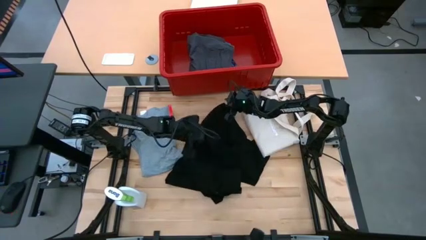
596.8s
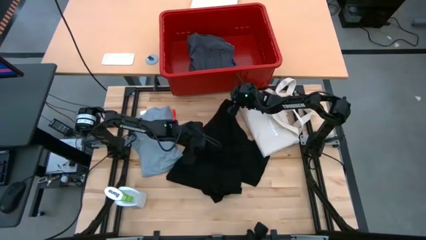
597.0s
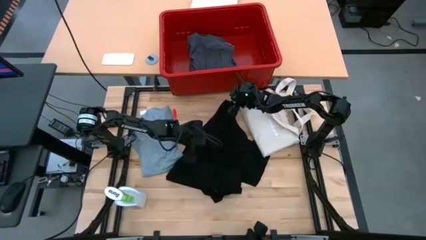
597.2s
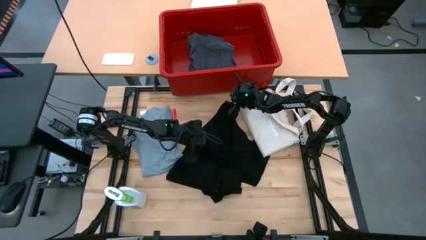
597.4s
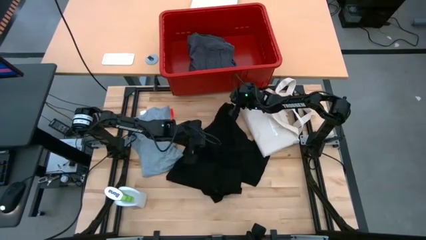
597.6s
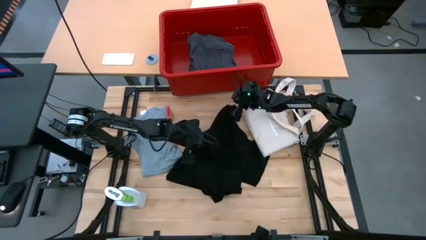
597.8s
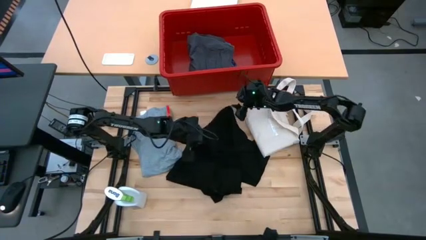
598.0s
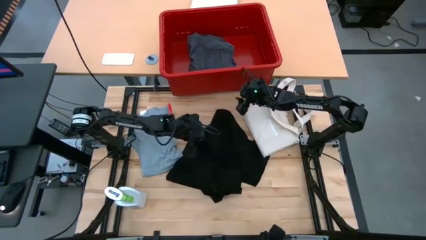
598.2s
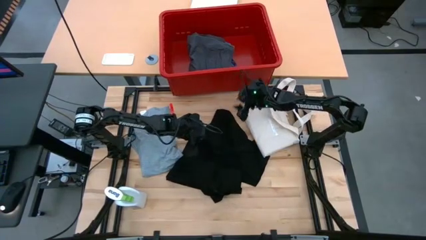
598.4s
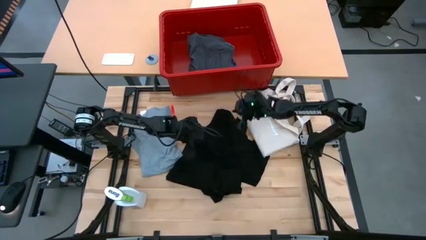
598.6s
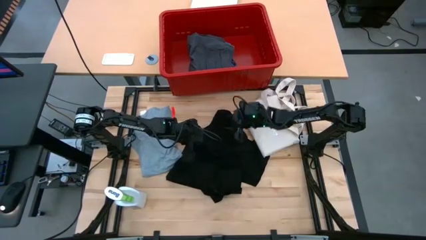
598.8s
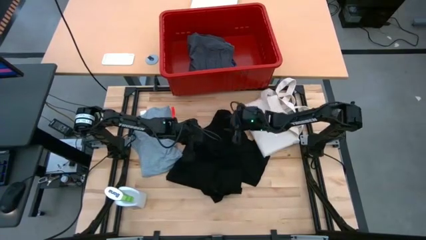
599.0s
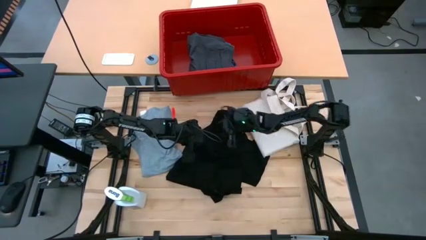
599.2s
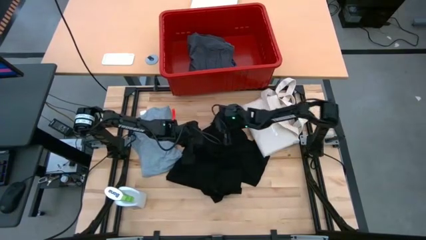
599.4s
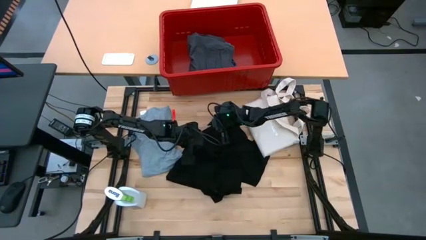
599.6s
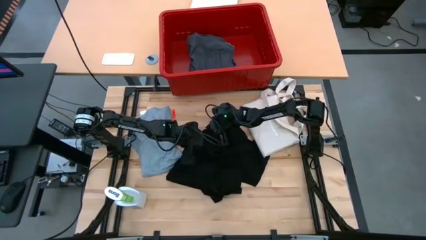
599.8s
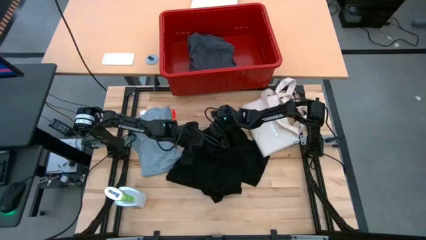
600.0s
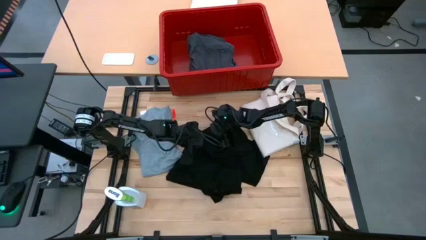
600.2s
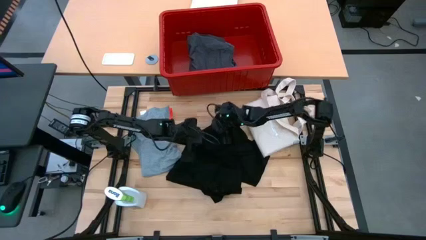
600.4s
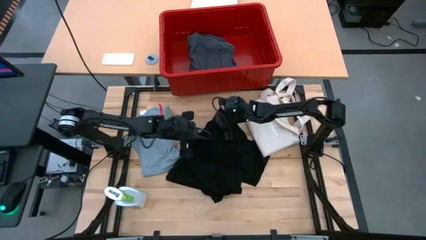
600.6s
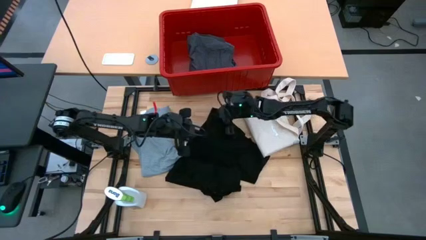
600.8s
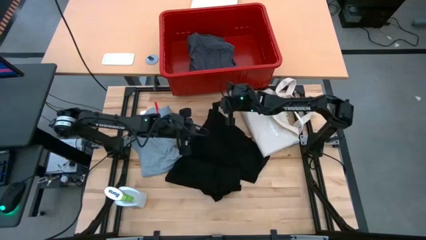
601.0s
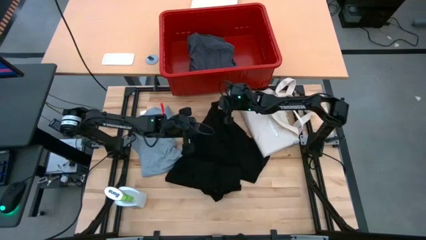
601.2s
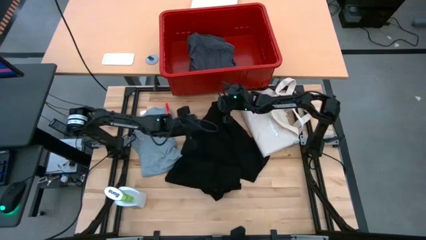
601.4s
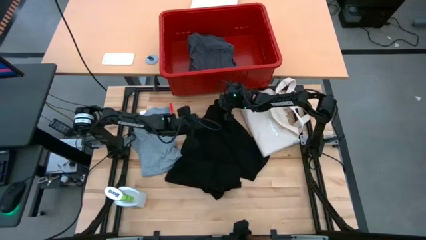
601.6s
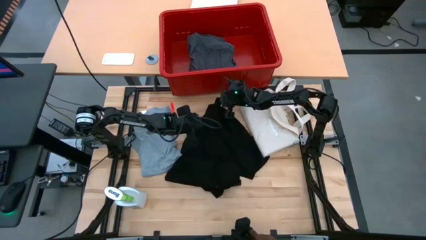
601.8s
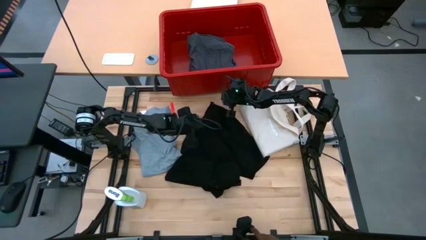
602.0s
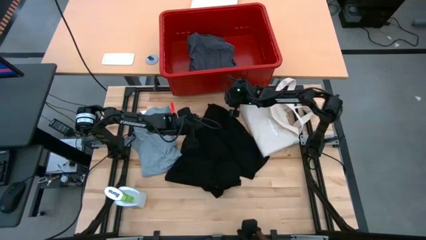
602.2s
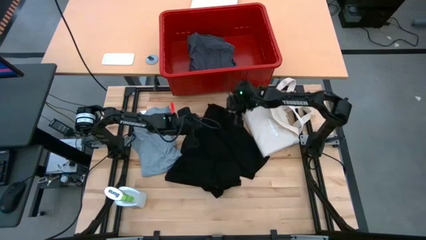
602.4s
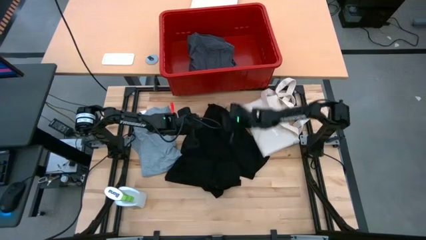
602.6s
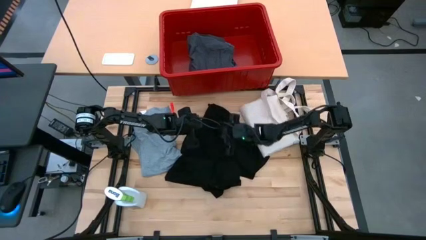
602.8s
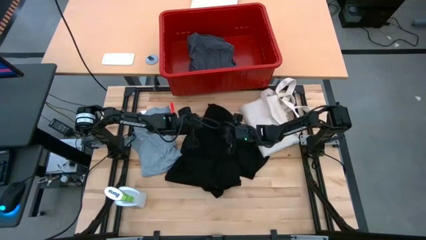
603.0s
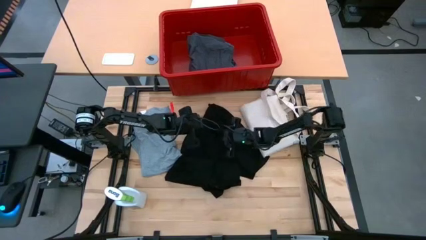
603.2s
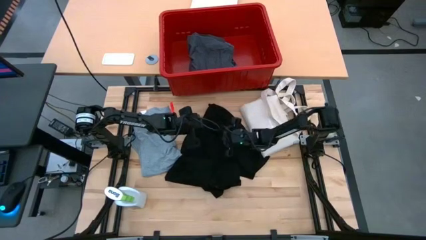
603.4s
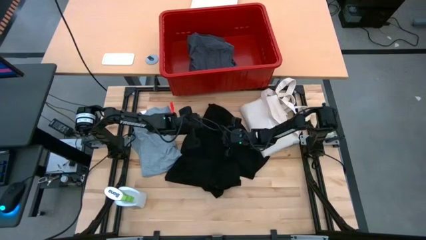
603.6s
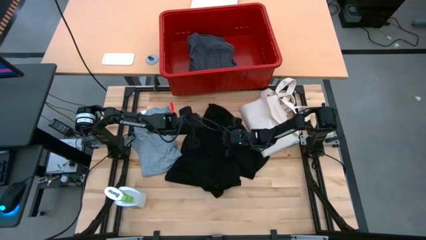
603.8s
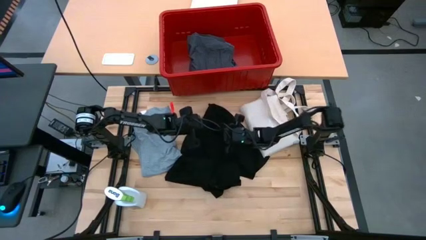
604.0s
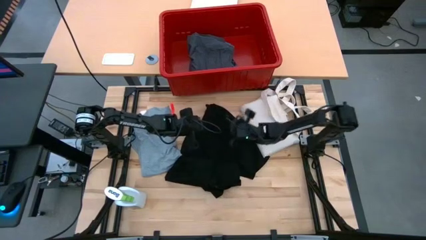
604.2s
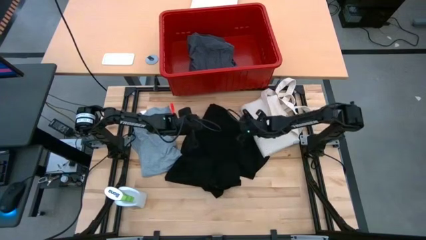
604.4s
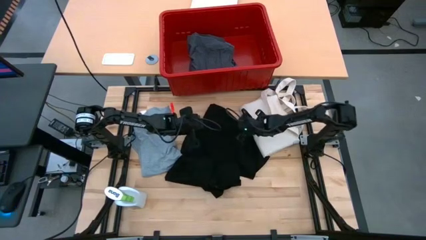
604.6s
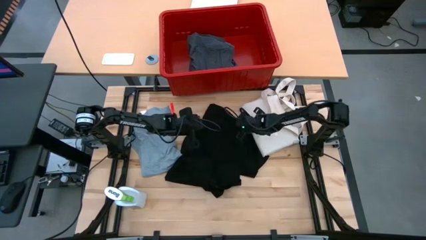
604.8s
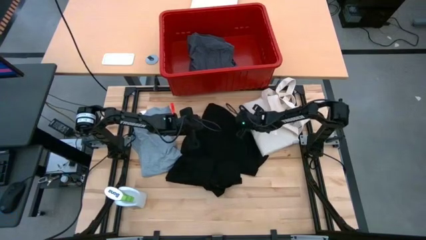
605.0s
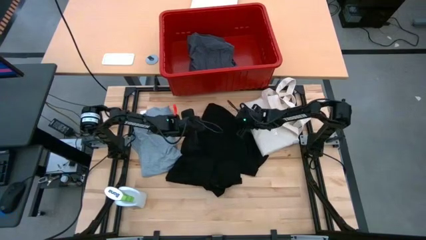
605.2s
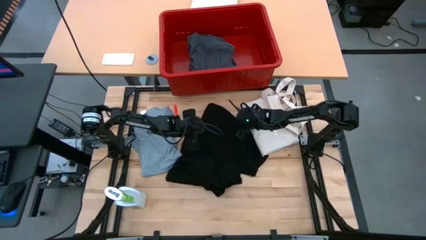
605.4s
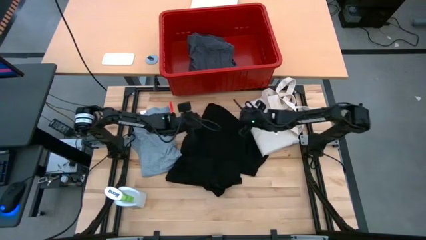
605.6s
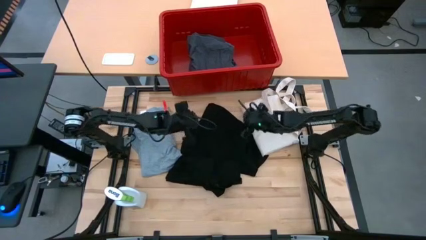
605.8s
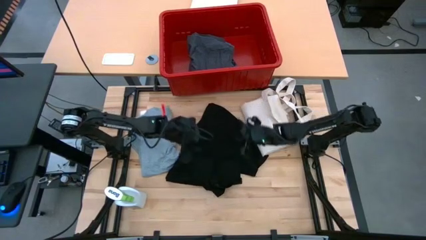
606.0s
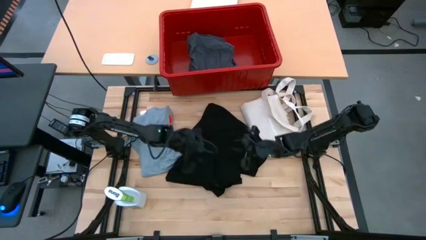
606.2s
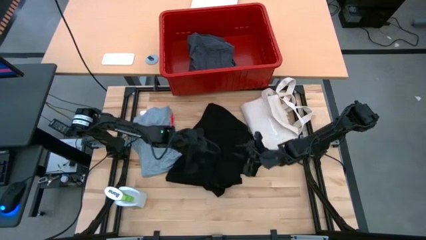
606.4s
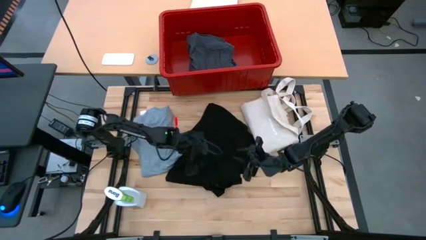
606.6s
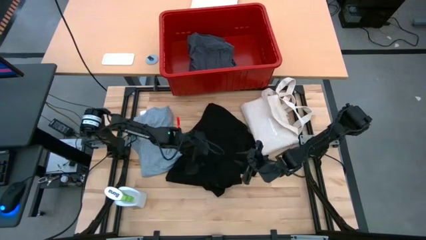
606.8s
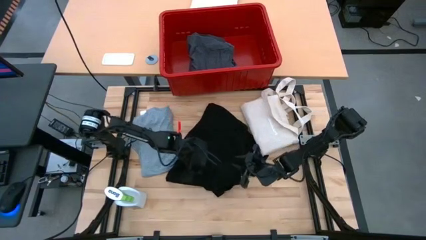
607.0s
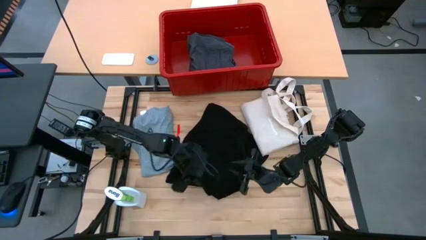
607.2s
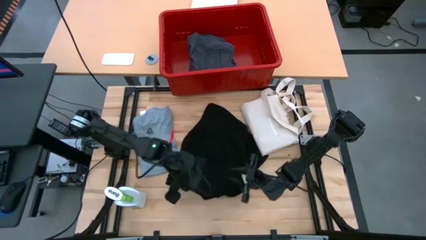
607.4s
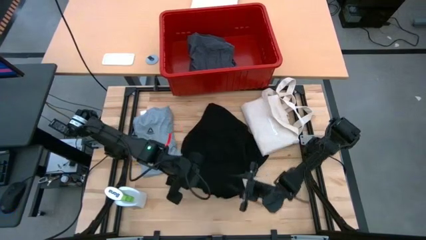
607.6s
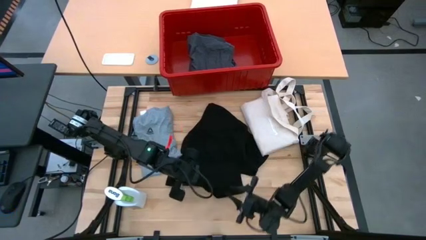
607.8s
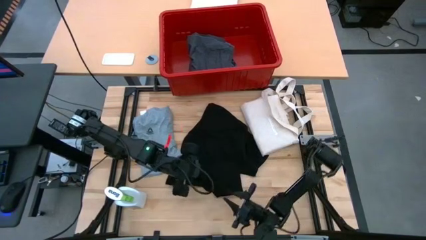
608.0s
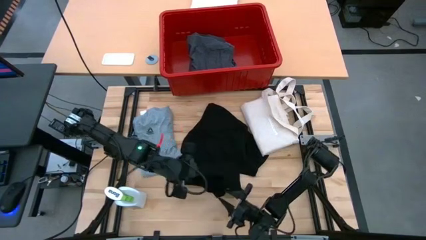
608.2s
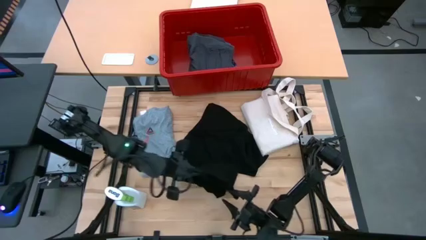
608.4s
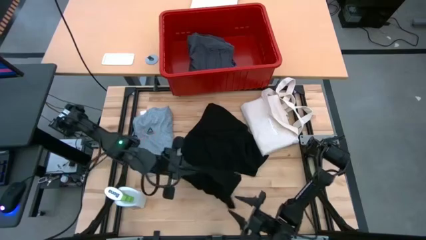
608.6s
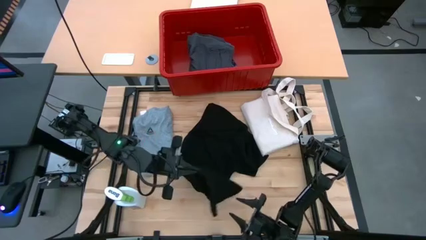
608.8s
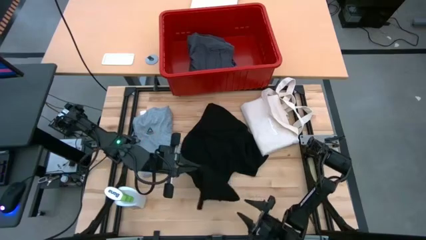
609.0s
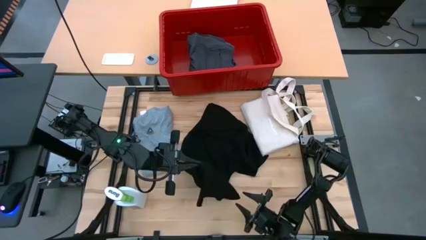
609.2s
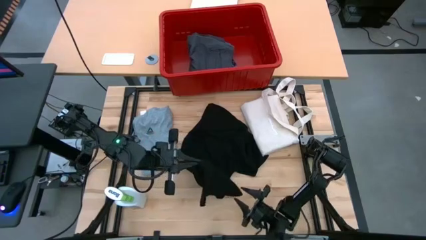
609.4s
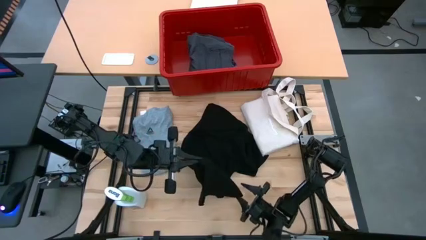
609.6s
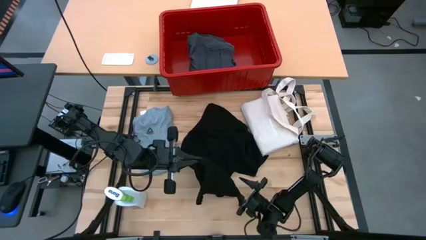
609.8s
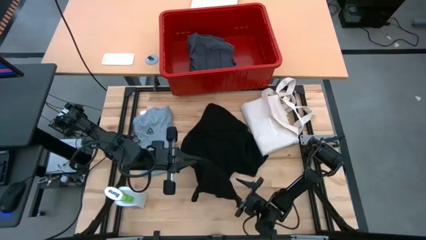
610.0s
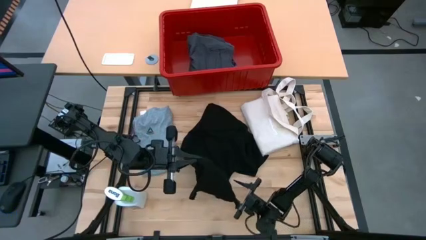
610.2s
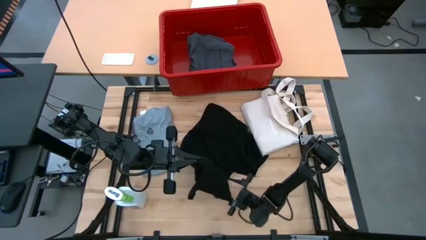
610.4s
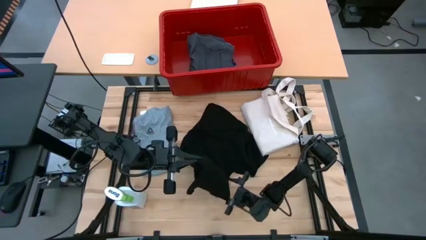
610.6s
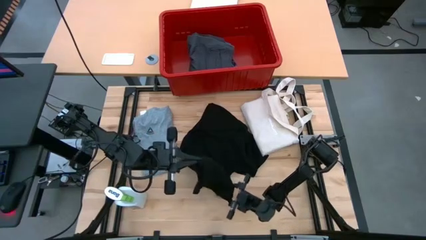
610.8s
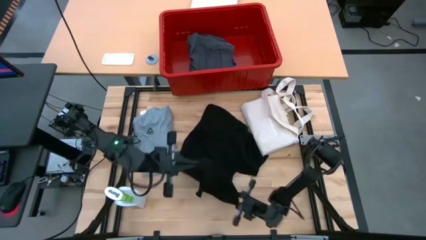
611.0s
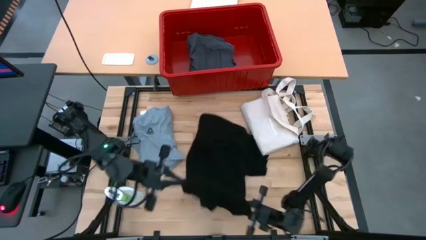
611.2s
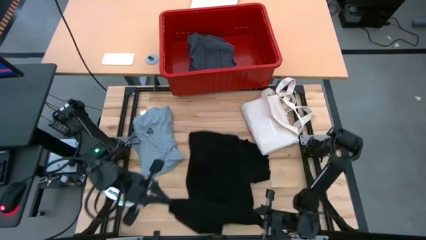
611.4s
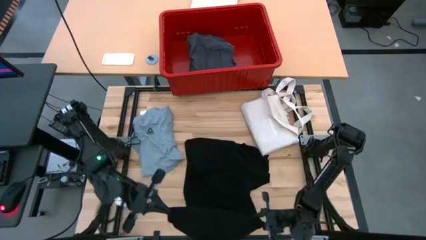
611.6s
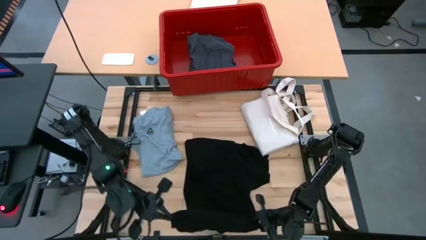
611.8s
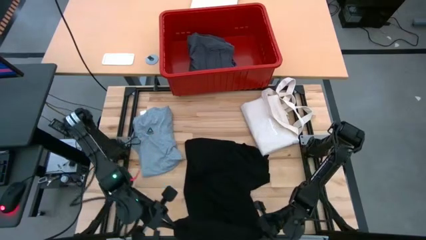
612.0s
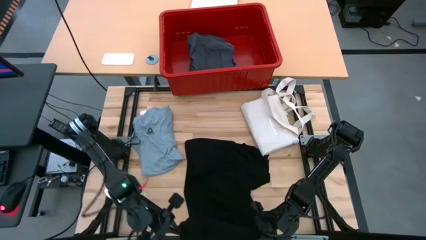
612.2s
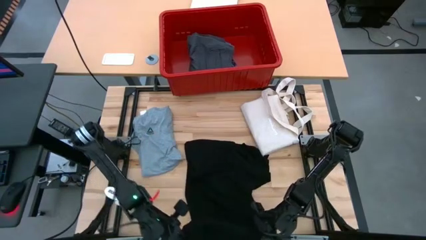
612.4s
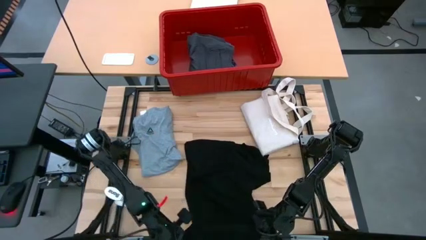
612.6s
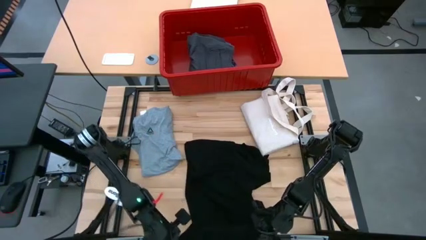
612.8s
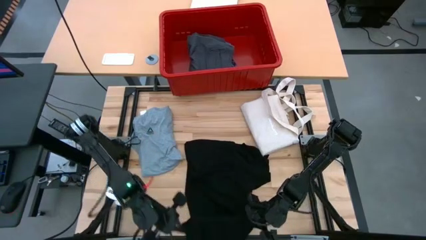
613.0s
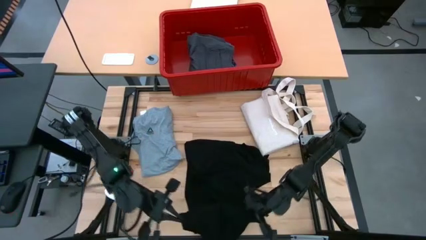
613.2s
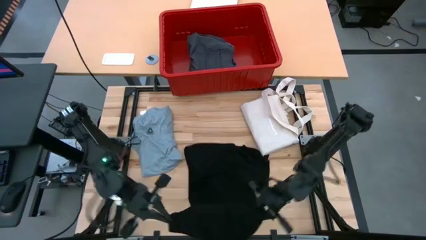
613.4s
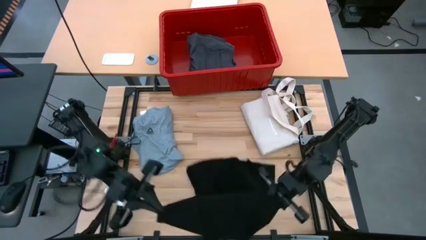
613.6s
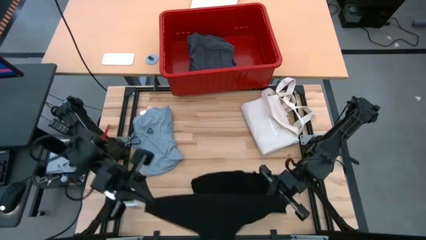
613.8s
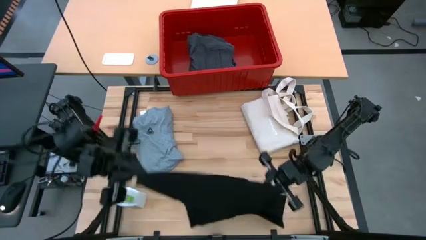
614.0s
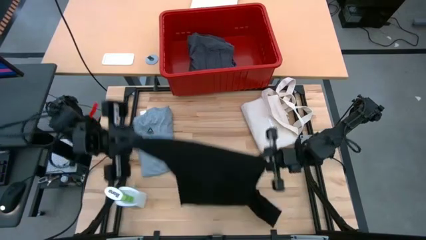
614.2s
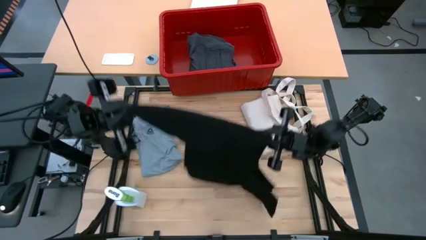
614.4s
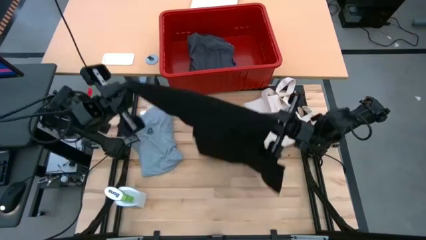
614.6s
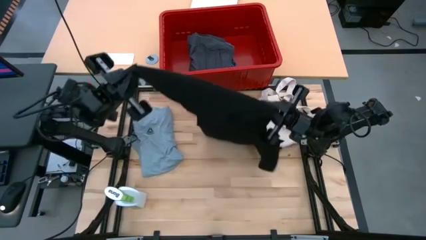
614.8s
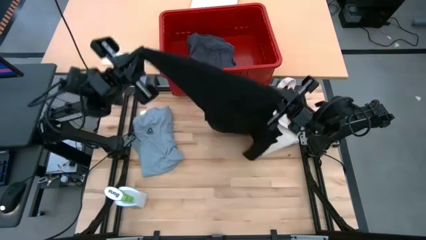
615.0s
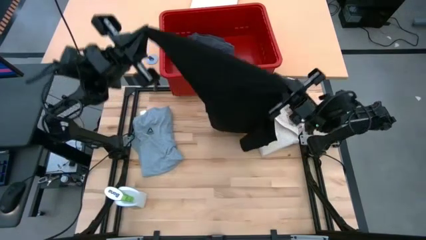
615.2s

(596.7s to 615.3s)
Task: Fold Laundry from Bin
Fold the black shirt
